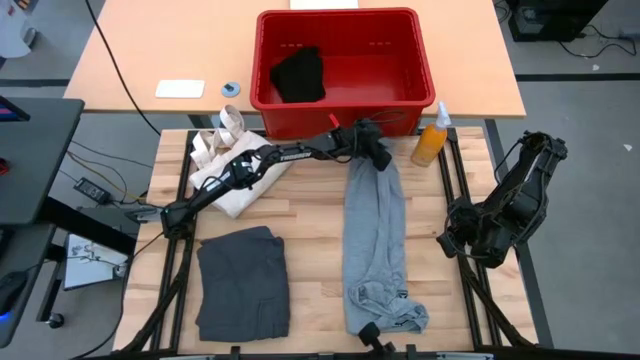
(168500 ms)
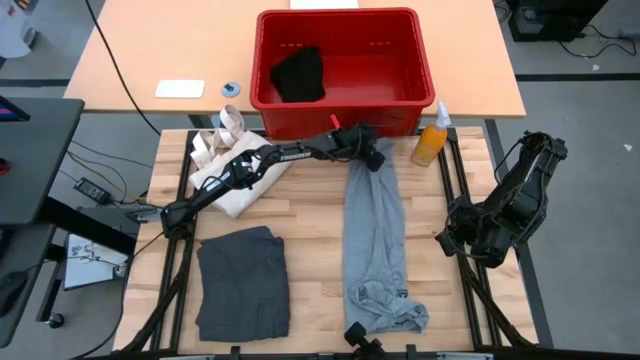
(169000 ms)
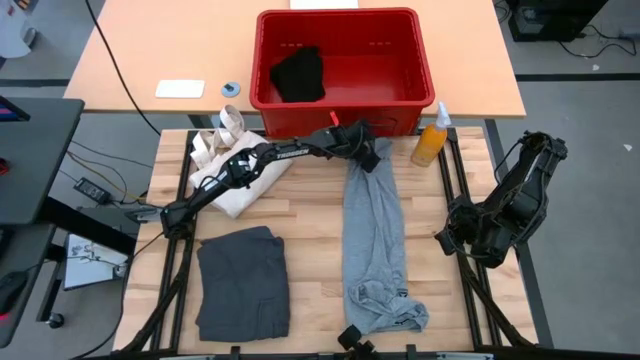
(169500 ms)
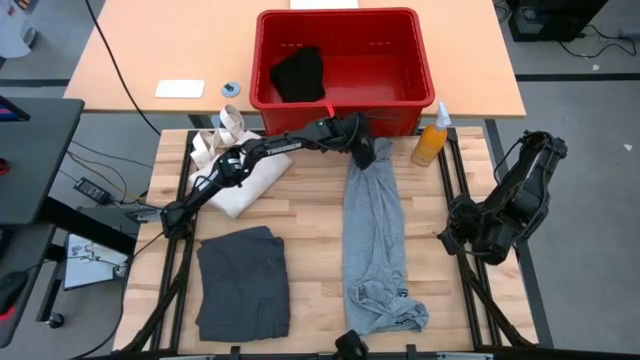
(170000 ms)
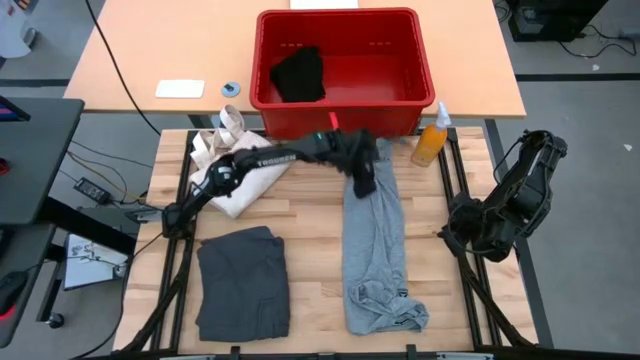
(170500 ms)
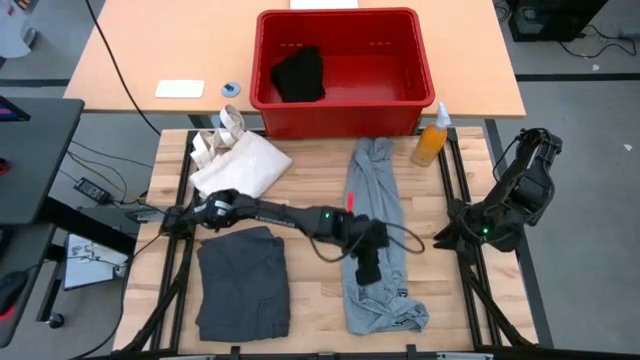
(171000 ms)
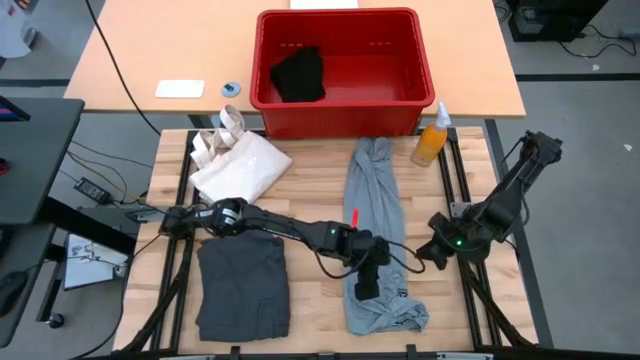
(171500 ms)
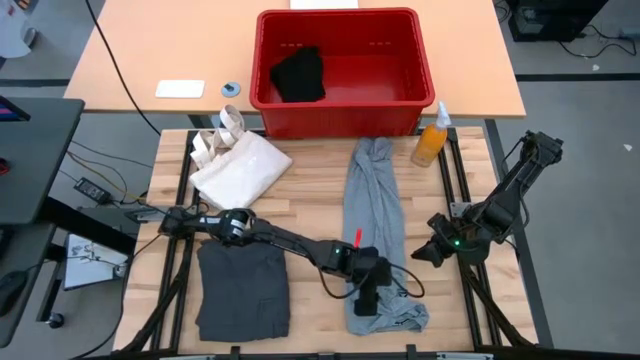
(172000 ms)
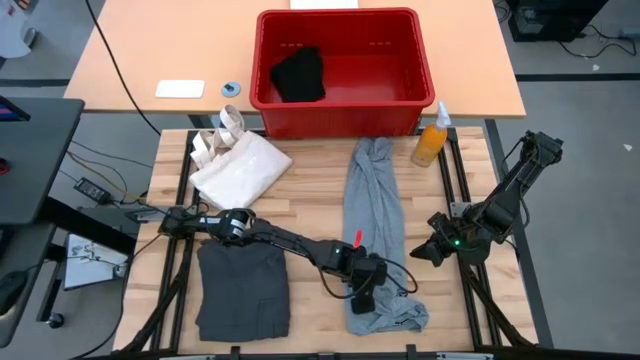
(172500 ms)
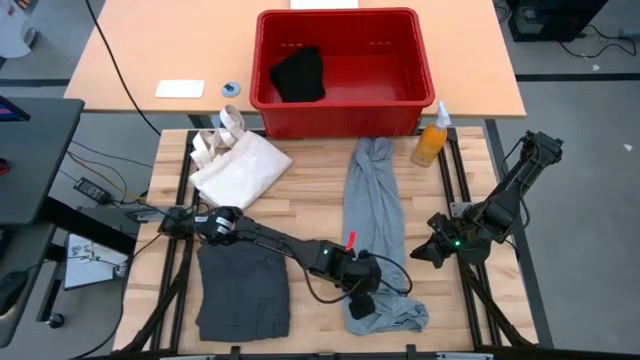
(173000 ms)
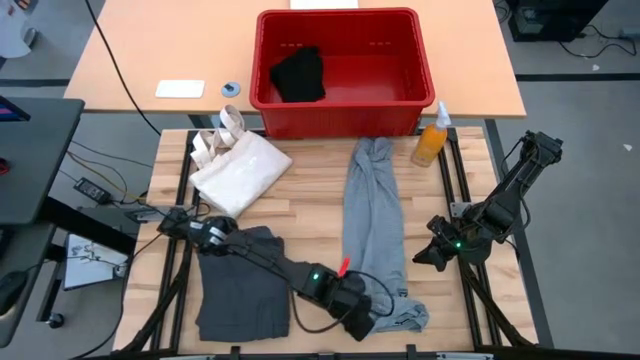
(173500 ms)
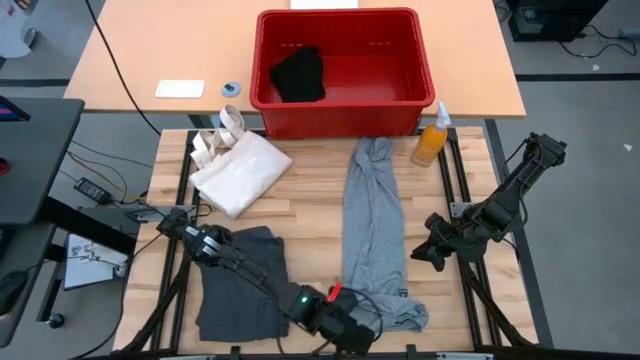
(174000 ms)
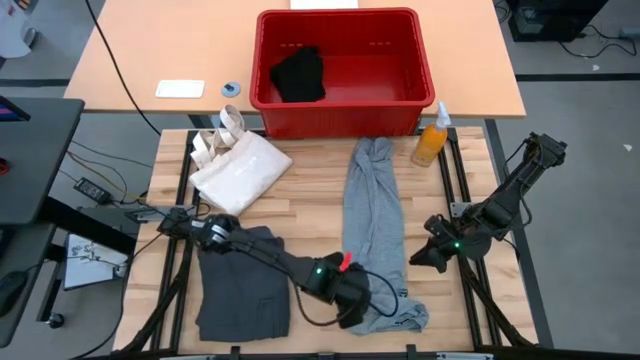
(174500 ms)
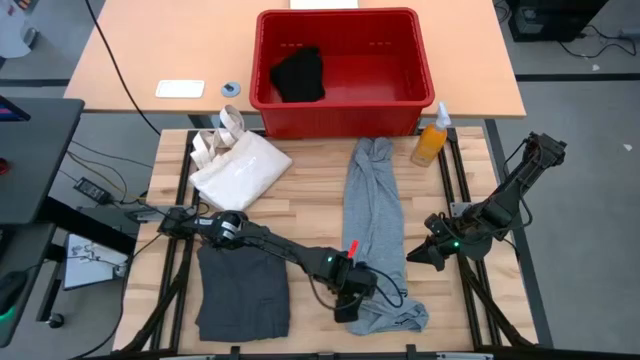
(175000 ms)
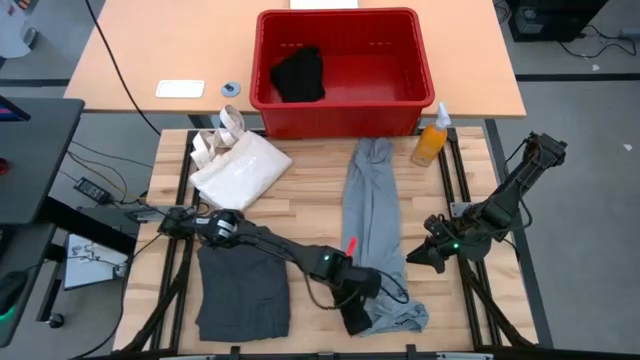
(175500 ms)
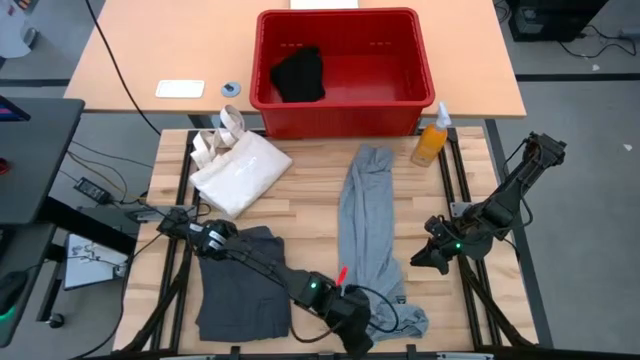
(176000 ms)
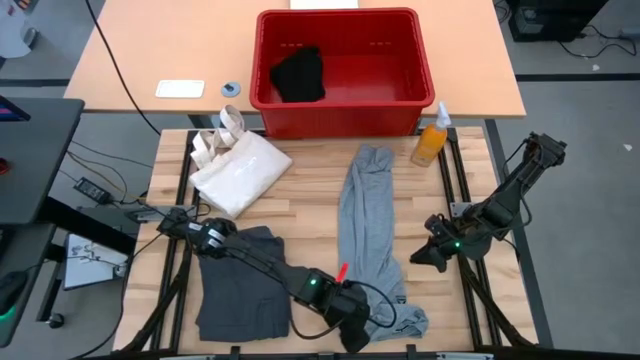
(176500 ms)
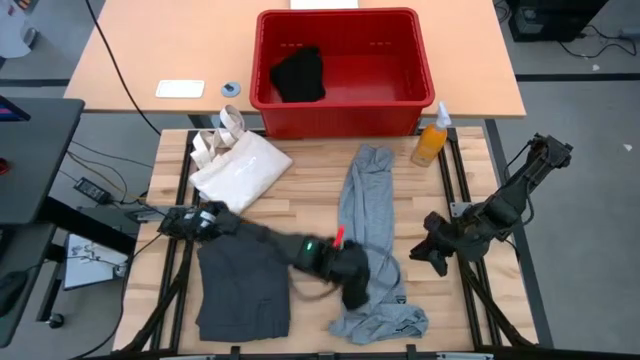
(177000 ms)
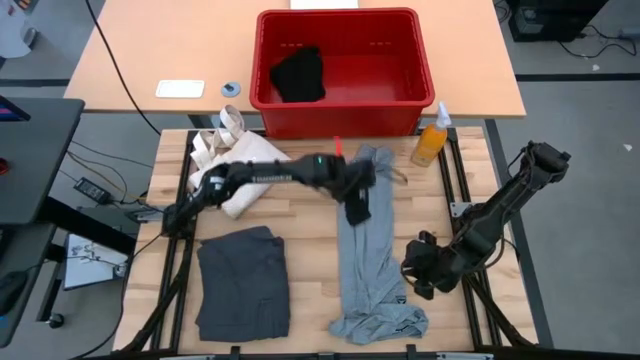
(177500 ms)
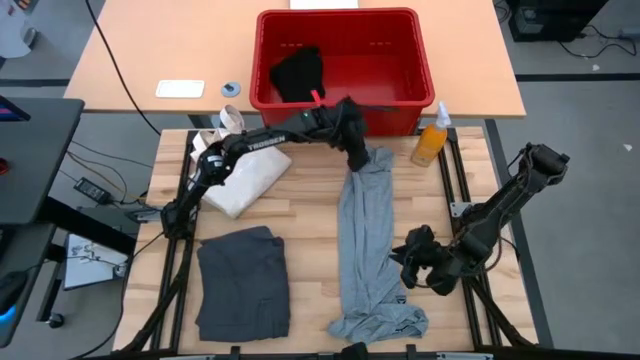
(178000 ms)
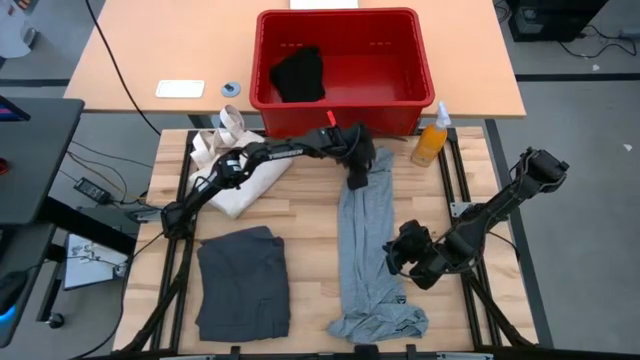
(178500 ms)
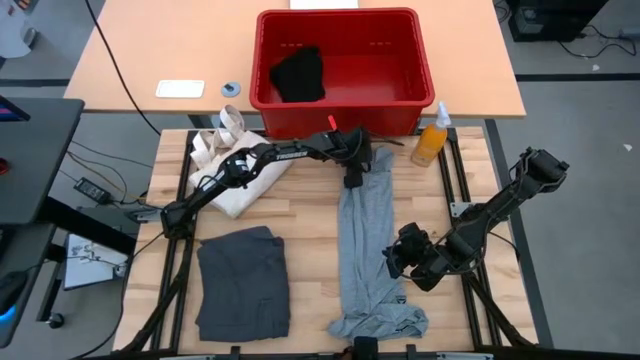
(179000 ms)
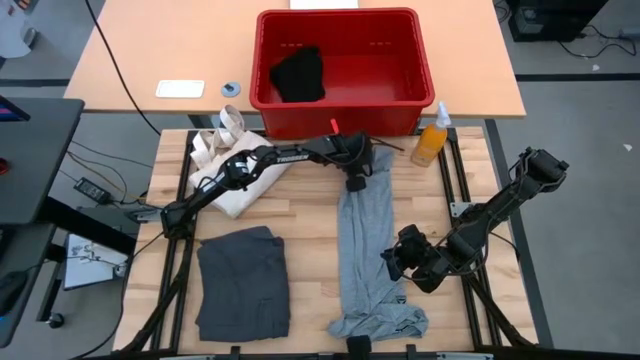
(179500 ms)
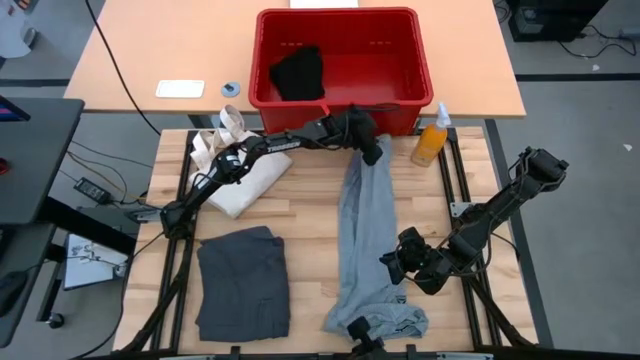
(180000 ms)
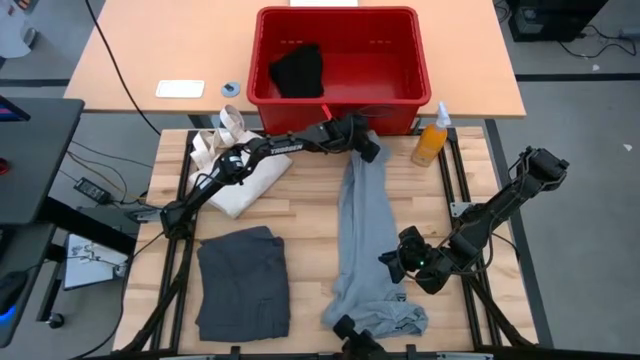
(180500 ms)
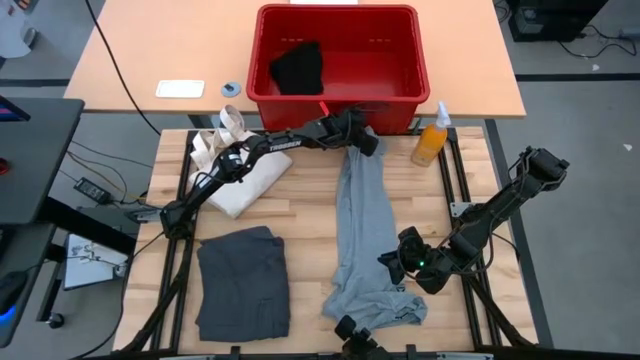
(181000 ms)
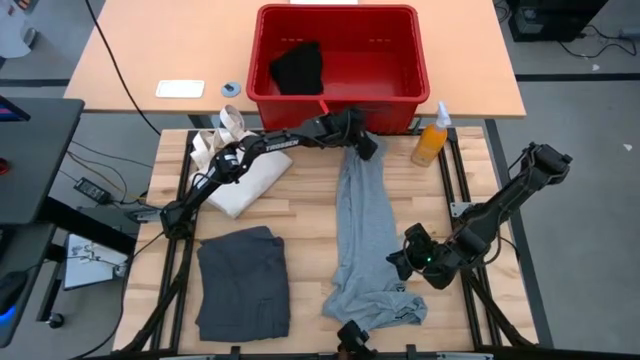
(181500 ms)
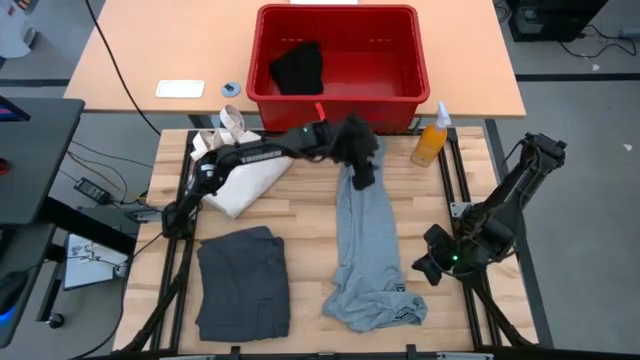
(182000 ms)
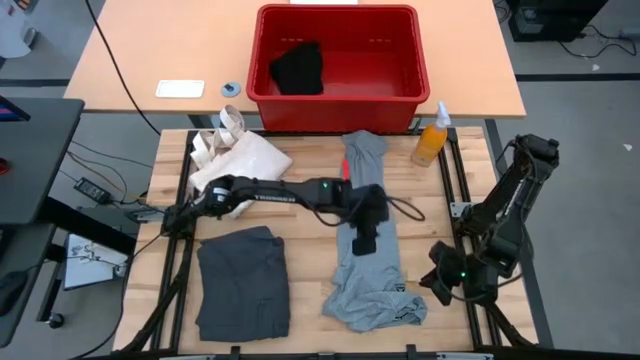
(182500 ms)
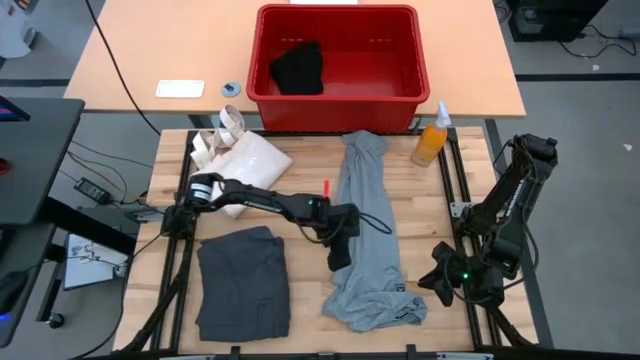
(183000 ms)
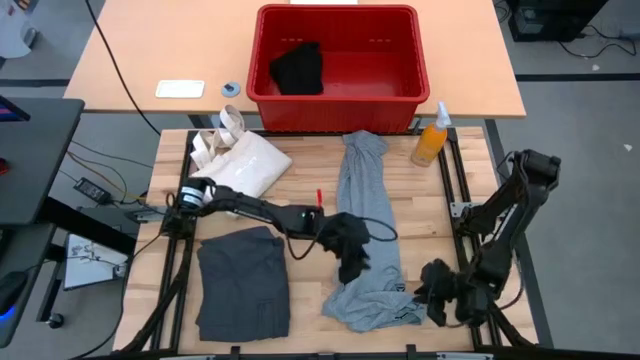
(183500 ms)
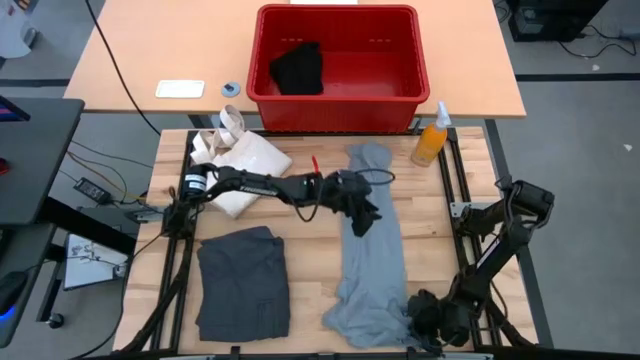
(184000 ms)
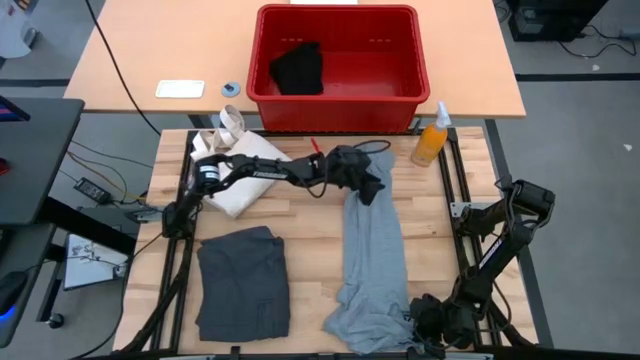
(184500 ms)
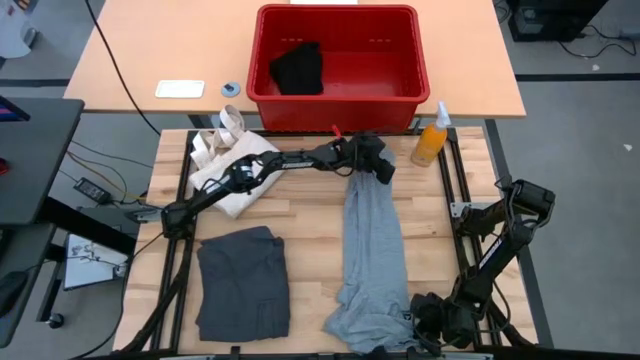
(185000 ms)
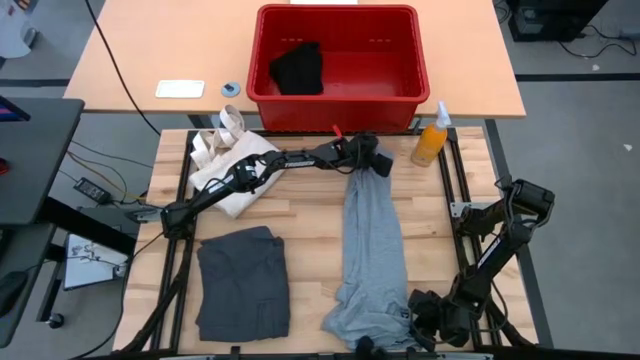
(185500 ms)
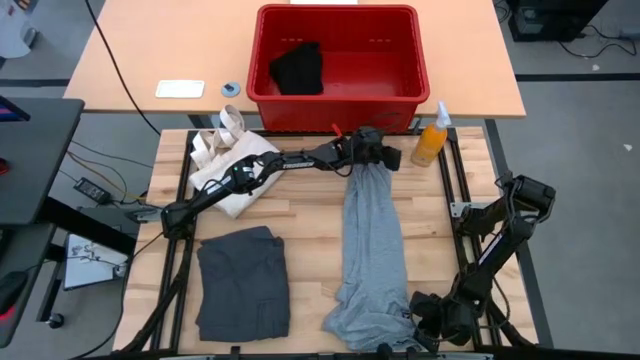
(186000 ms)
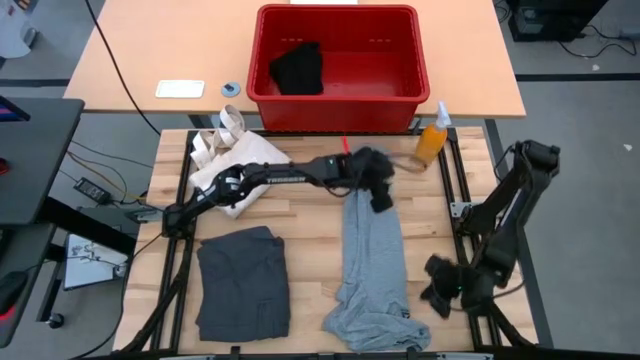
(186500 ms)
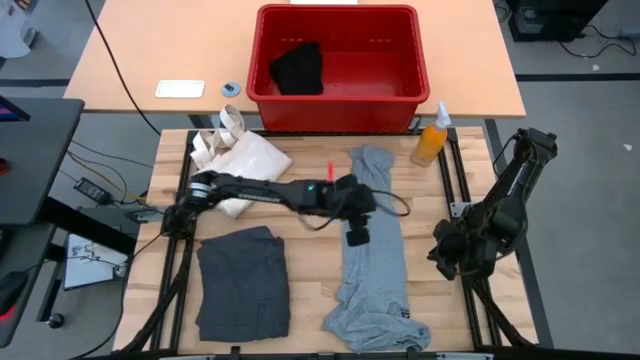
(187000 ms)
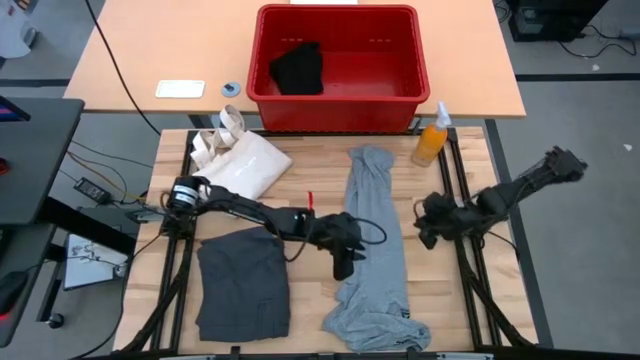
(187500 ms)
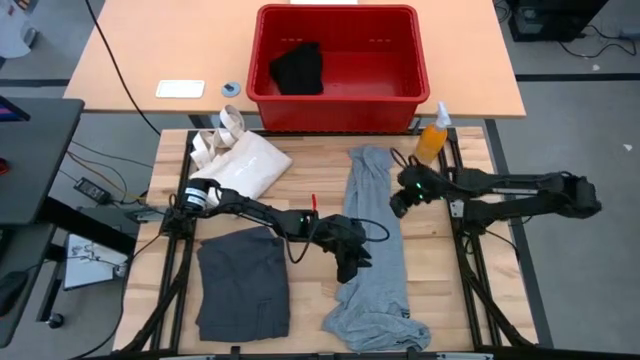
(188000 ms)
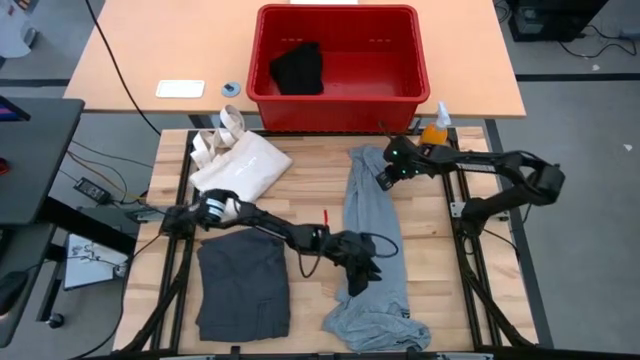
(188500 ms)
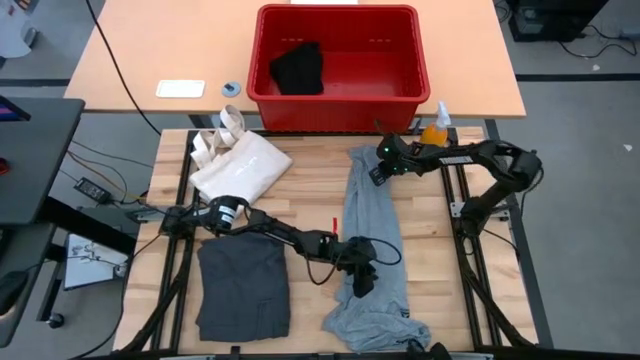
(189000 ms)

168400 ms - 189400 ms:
Task: Fold Laundry from Bin
Fold the light gray t-shirt
